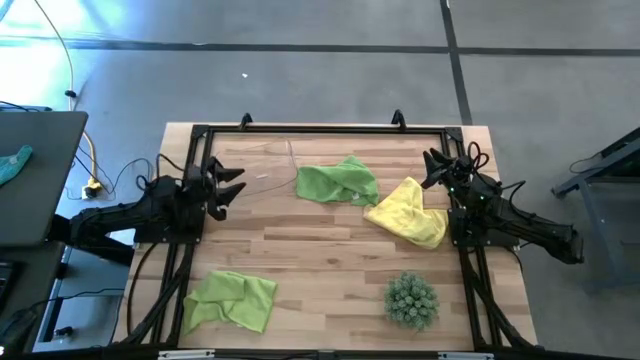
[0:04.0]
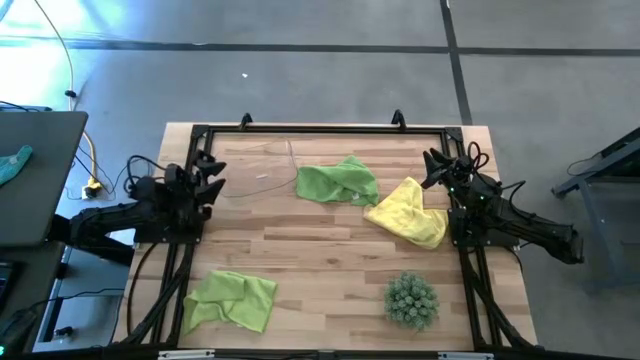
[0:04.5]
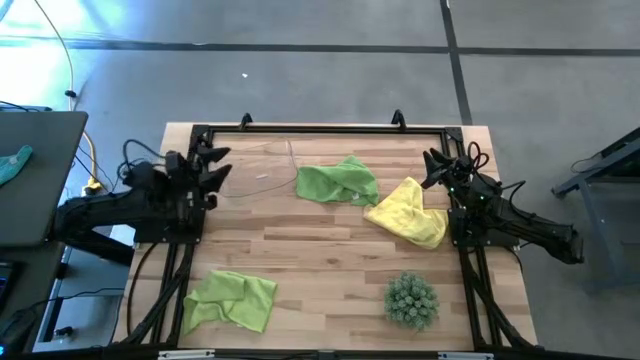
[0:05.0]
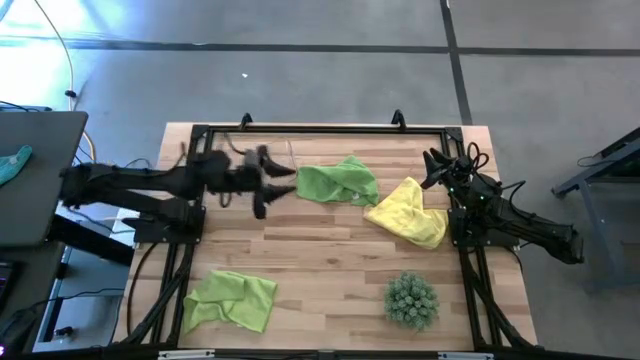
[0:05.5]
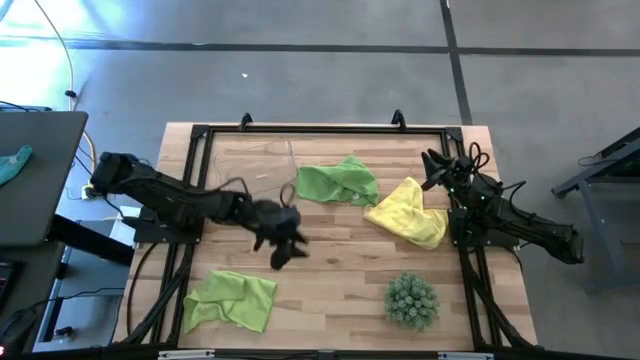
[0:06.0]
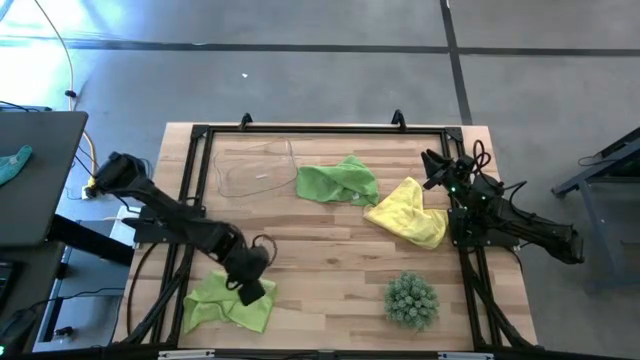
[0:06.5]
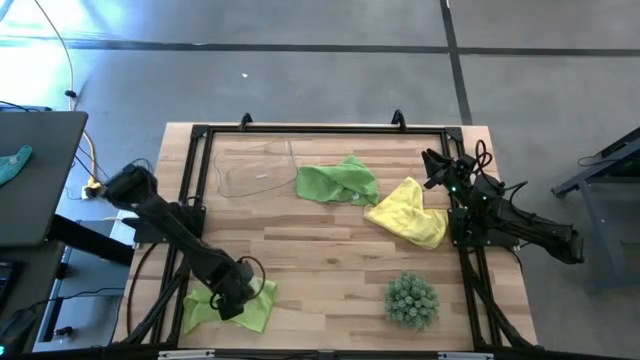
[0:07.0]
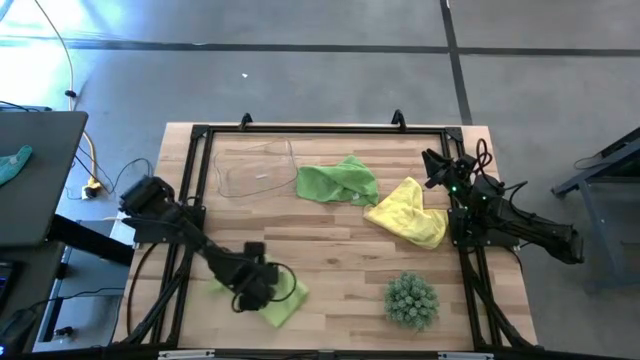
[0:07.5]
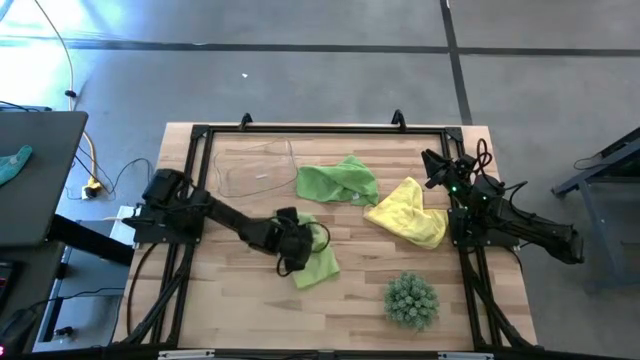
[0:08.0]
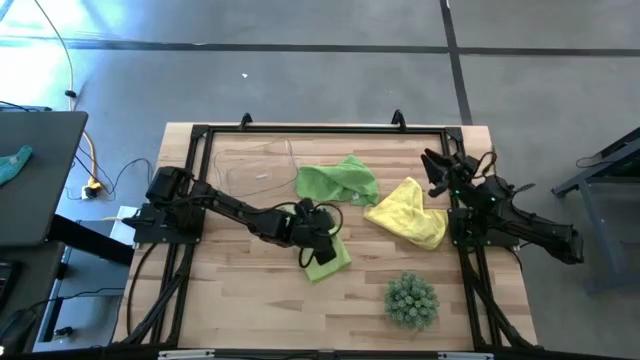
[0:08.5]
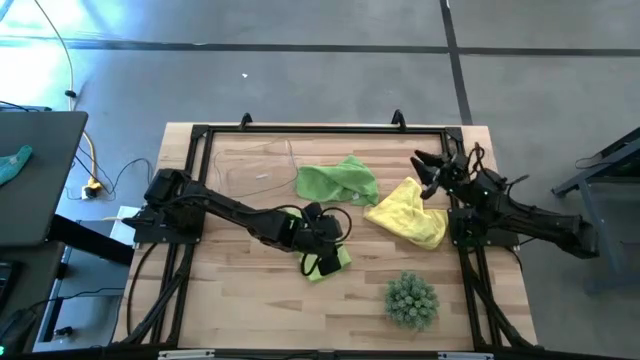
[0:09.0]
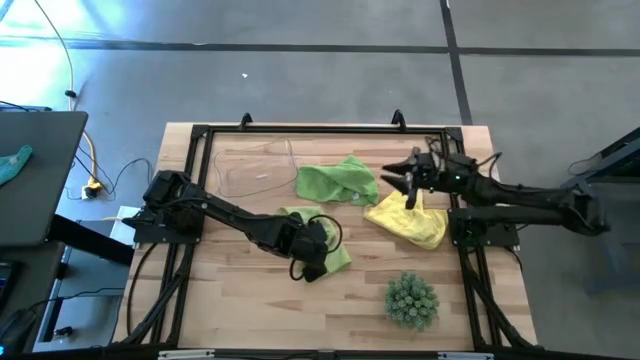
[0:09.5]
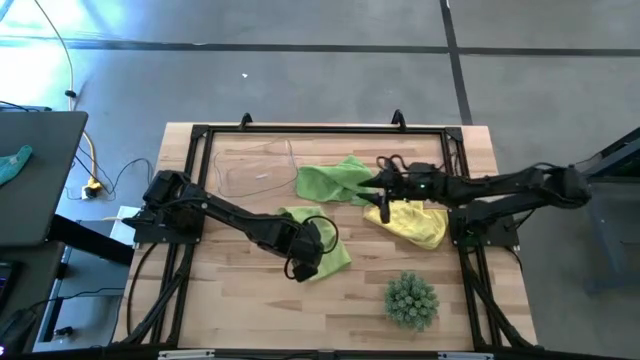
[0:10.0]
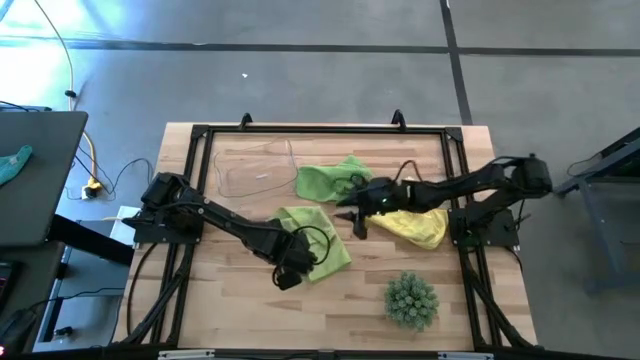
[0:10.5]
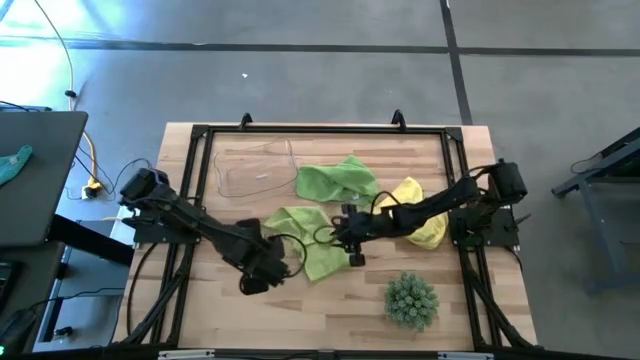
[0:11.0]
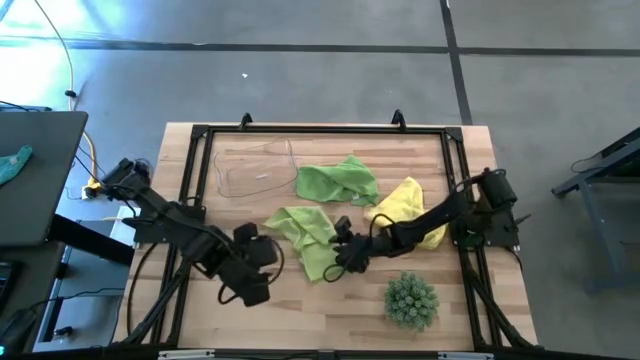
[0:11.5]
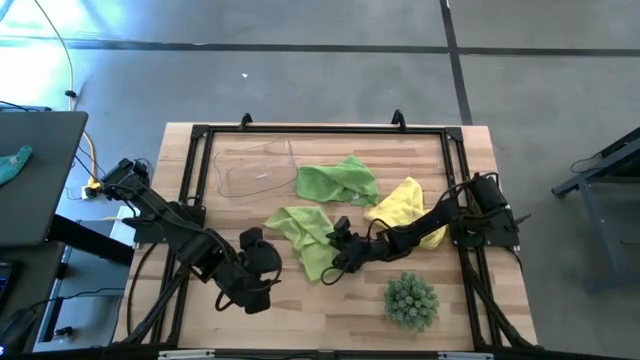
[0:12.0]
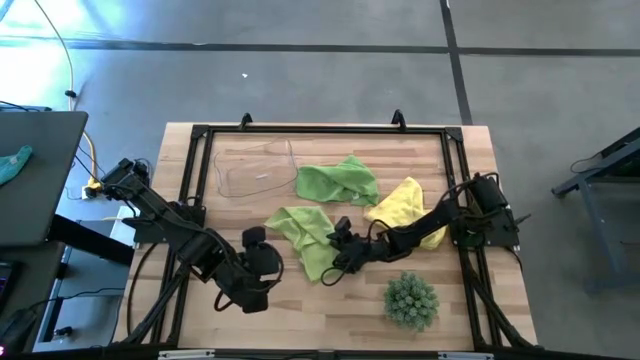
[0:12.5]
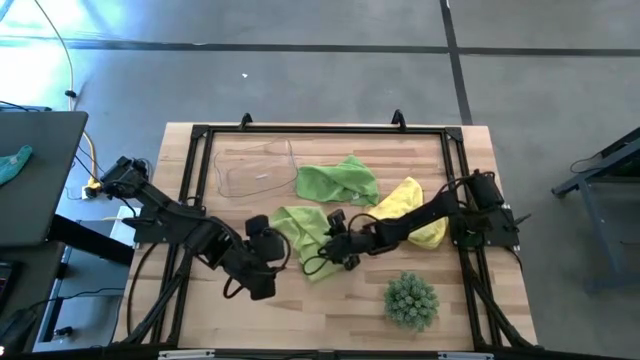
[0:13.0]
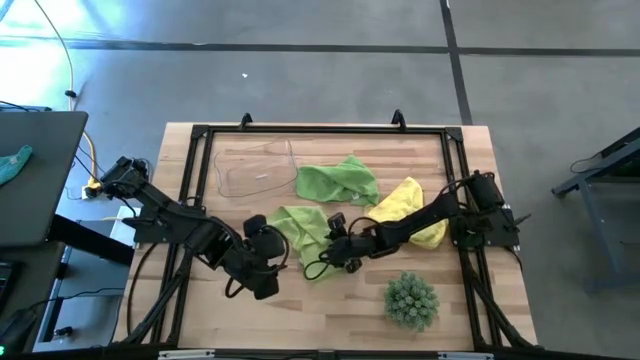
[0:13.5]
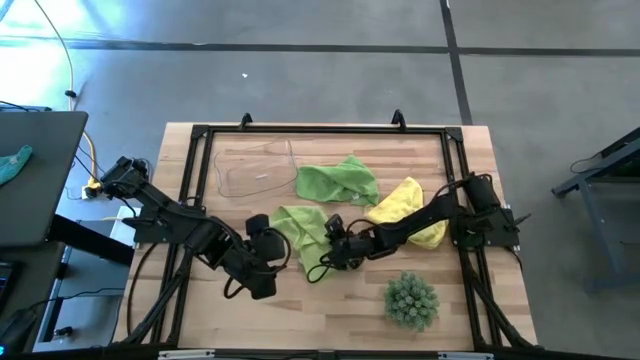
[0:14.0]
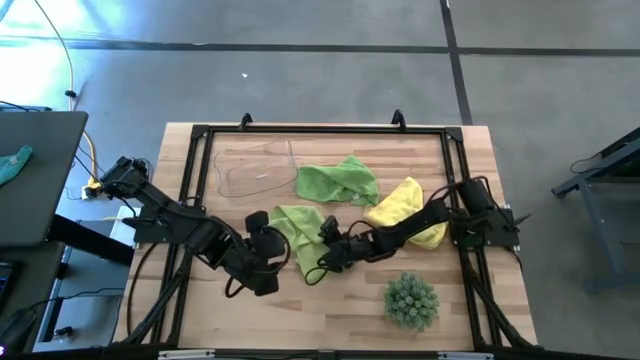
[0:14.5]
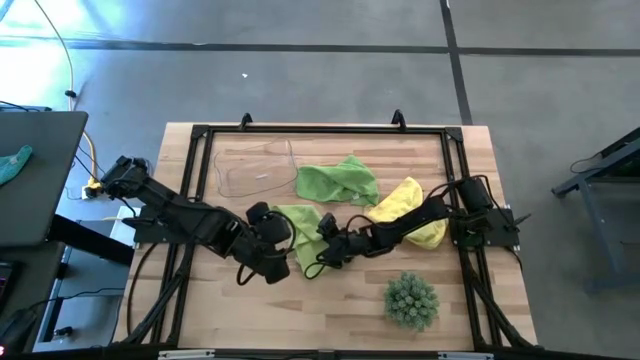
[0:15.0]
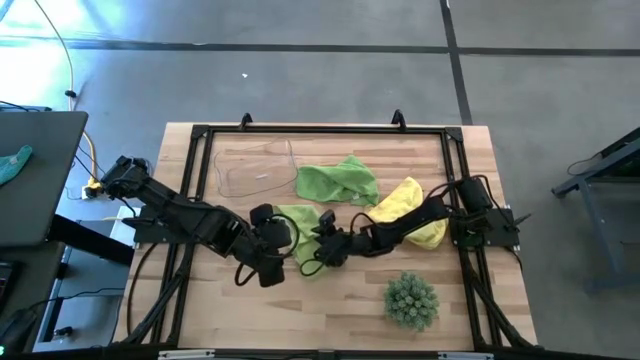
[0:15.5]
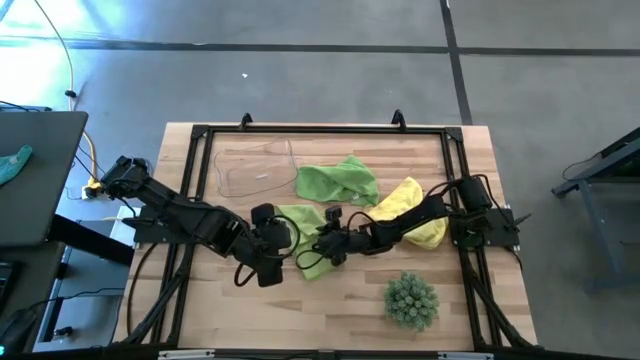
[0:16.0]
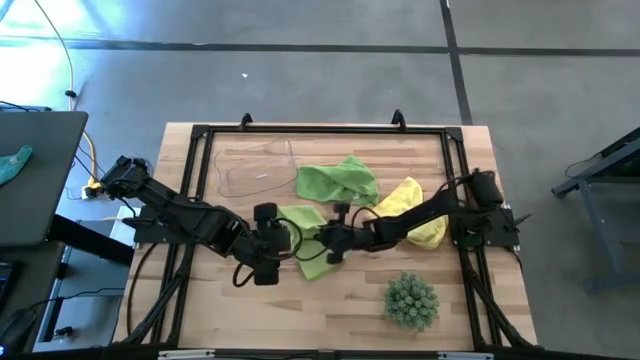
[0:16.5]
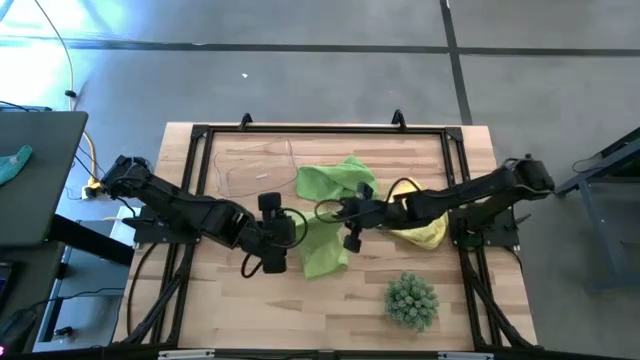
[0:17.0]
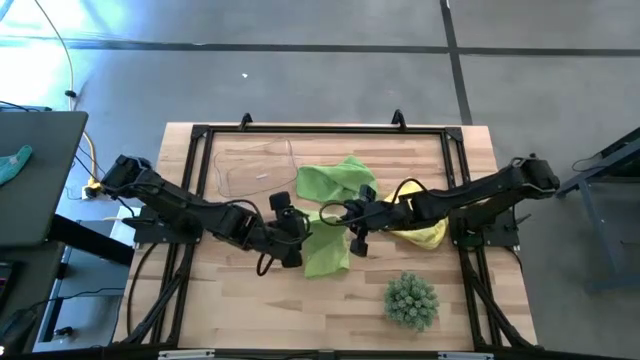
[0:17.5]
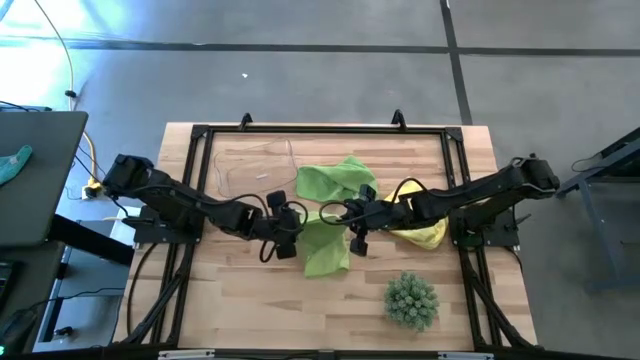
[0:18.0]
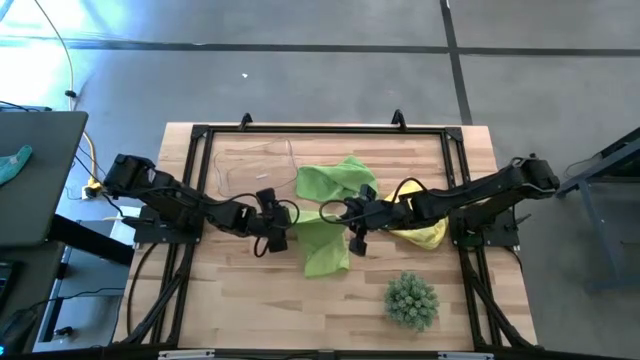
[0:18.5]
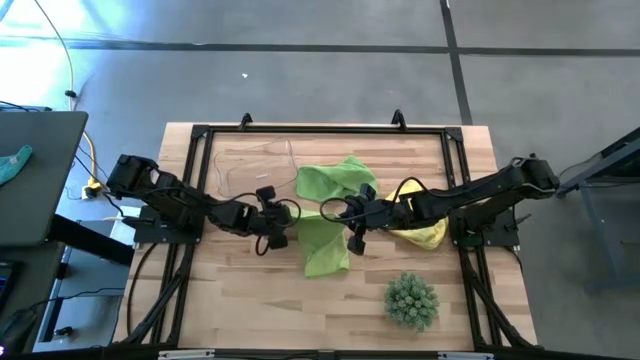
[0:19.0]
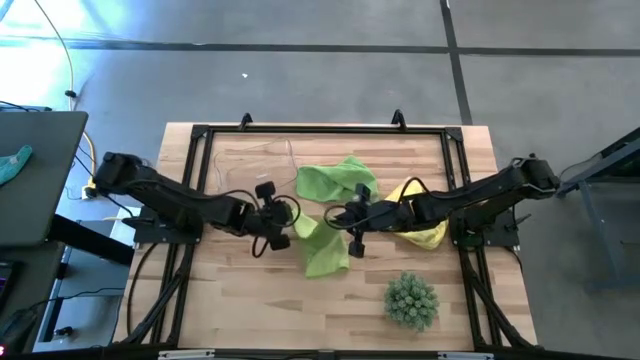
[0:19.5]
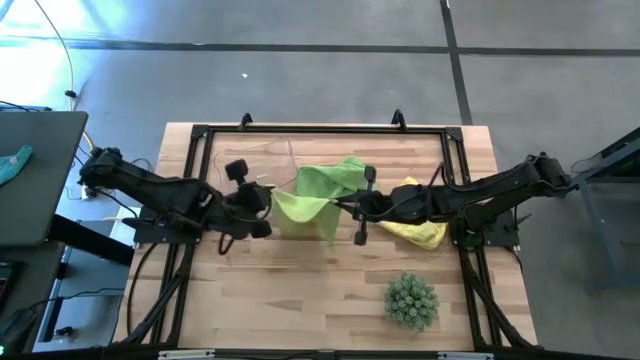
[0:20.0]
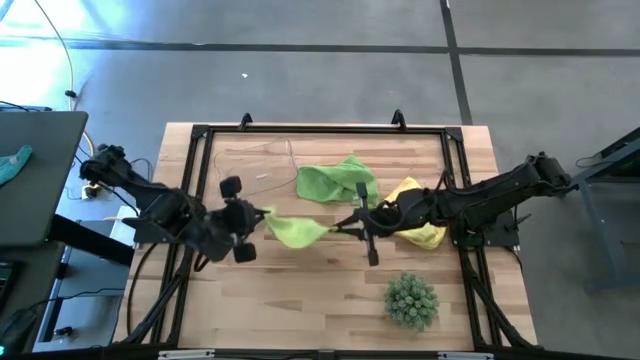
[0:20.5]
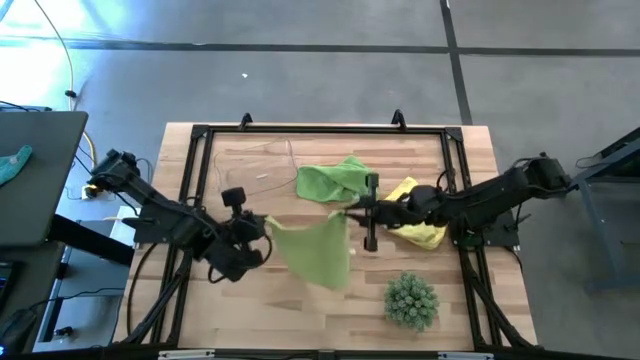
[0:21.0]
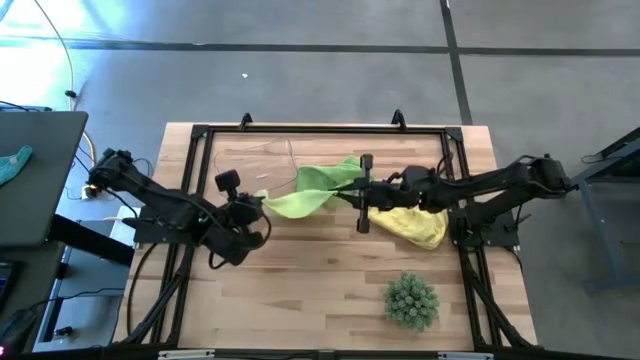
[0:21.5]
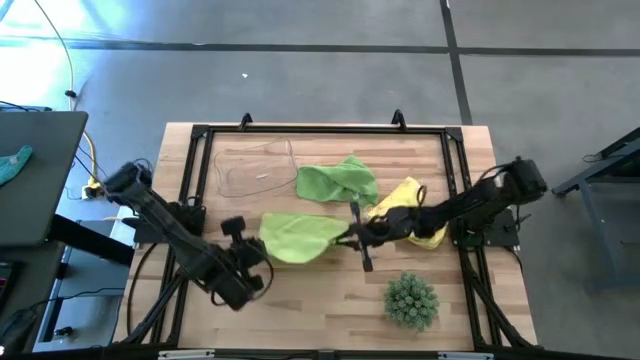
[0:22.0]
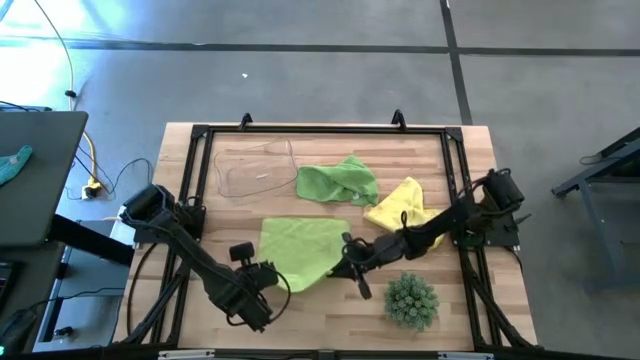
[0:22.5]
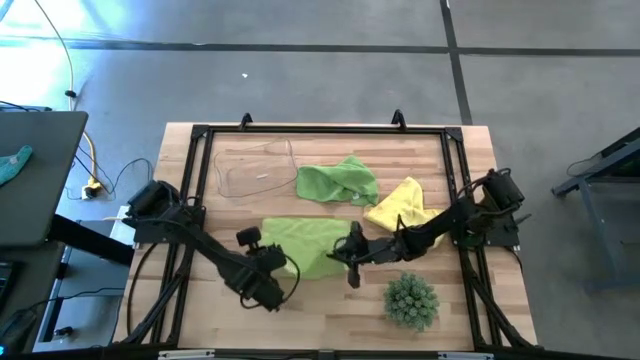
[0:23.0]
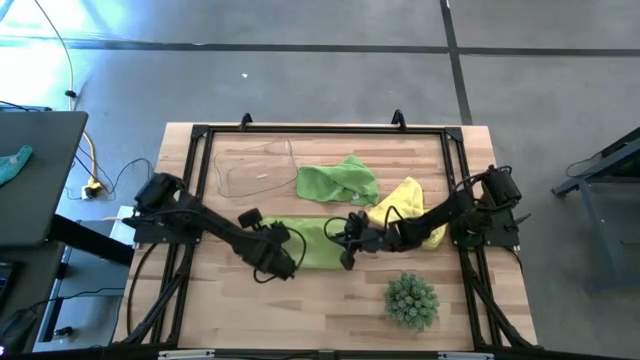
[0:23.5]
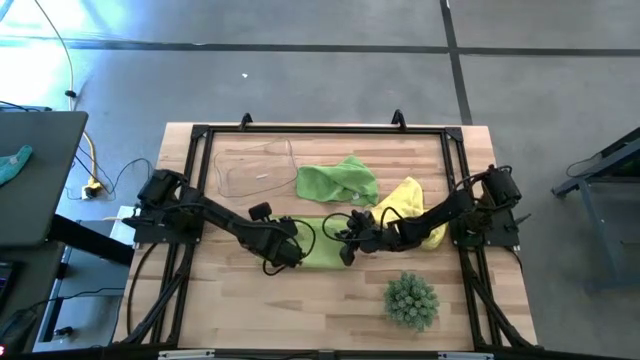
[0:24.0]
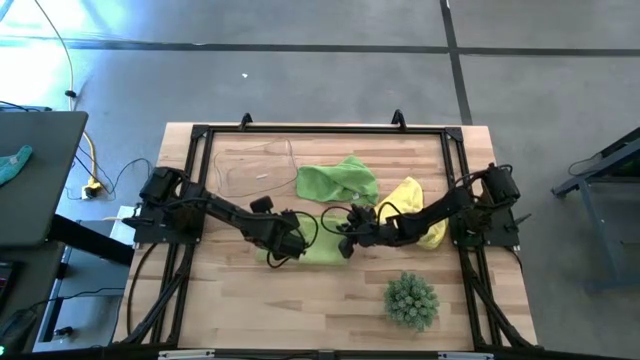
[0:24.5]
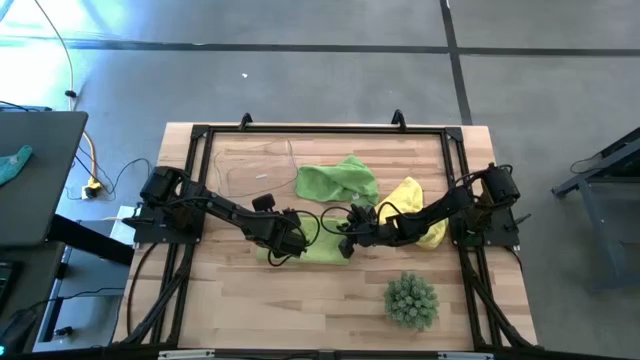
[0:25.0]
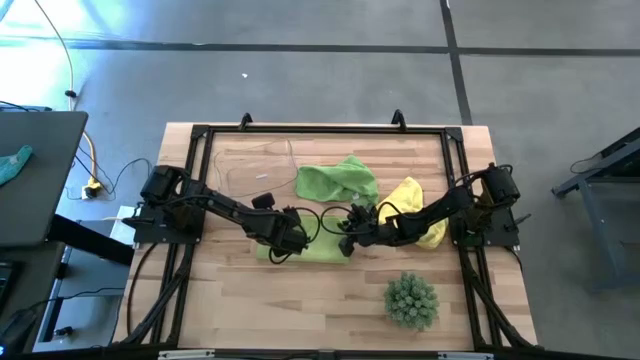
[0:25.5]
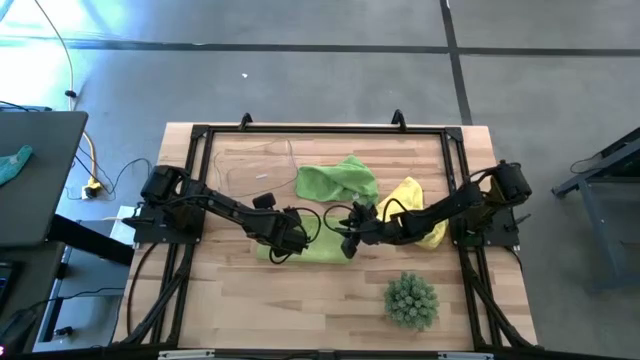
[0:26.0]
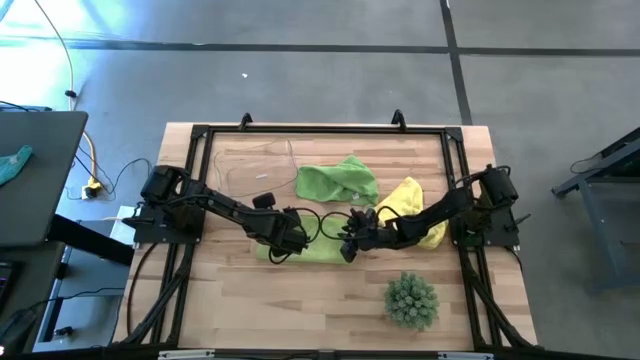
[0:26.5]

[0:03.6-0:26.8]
Task: Roll microfiber towels into tight, uniform cylinder then place into a basket
Fold the light green towel
